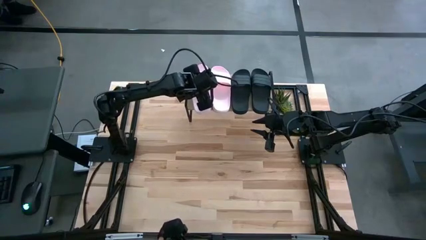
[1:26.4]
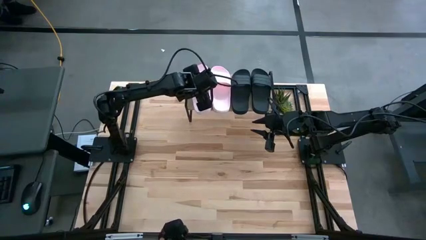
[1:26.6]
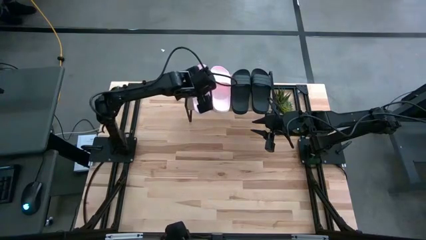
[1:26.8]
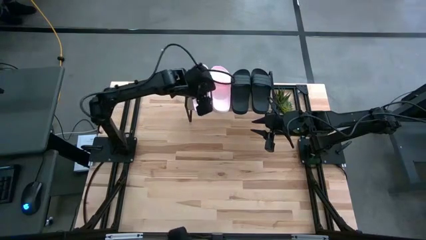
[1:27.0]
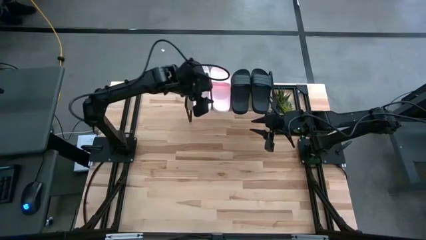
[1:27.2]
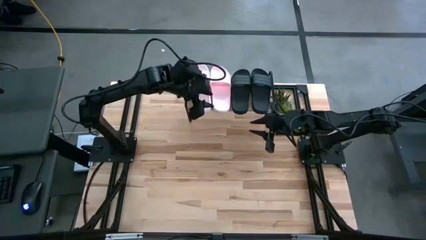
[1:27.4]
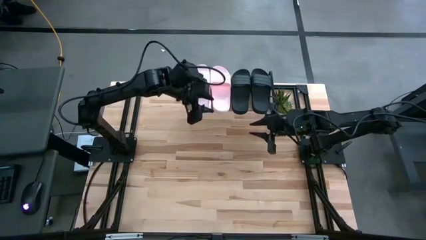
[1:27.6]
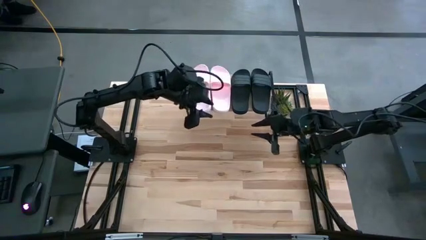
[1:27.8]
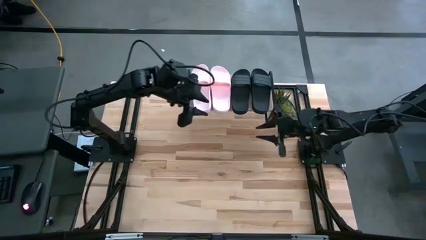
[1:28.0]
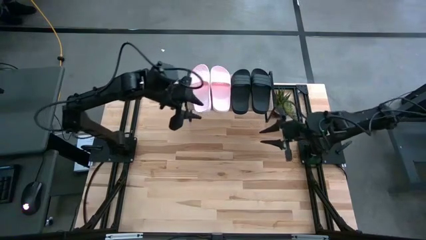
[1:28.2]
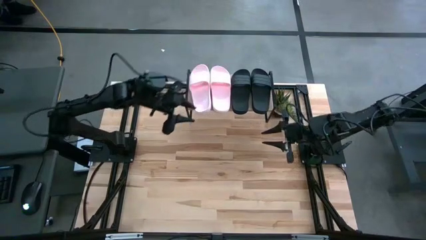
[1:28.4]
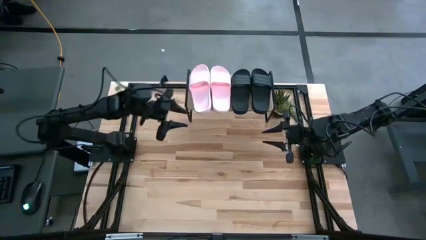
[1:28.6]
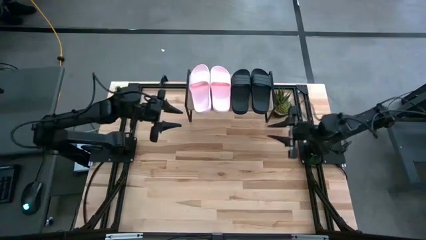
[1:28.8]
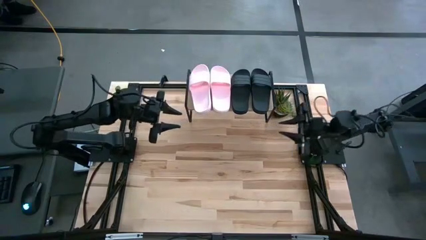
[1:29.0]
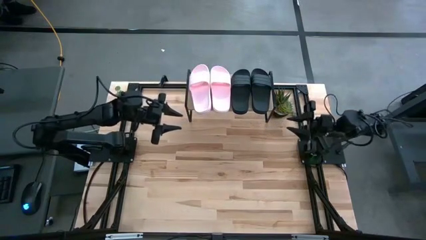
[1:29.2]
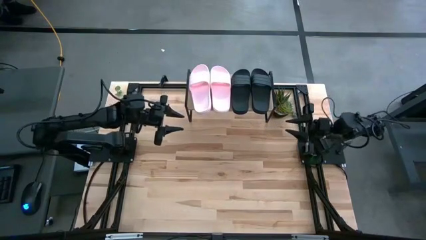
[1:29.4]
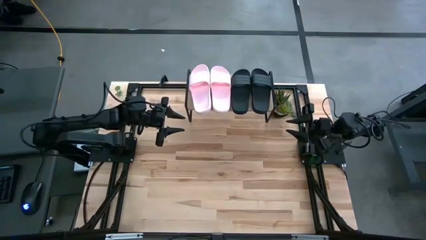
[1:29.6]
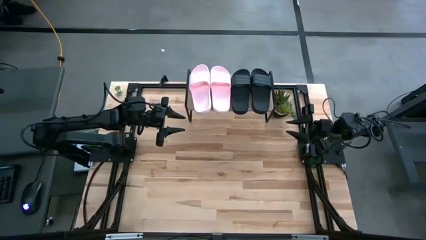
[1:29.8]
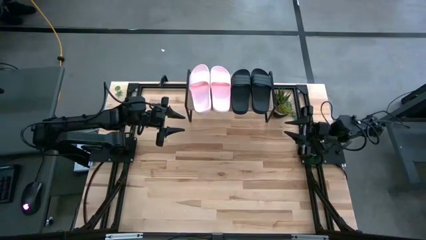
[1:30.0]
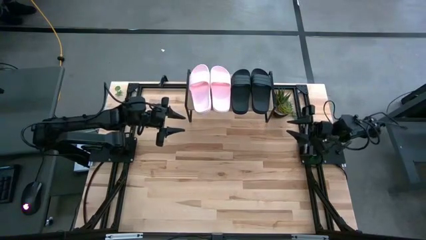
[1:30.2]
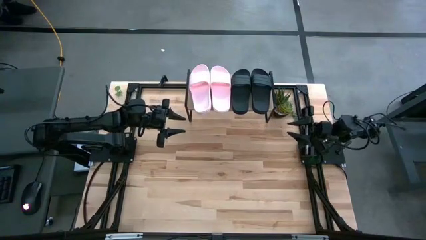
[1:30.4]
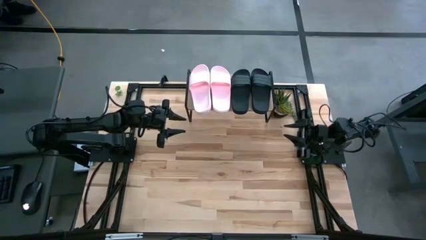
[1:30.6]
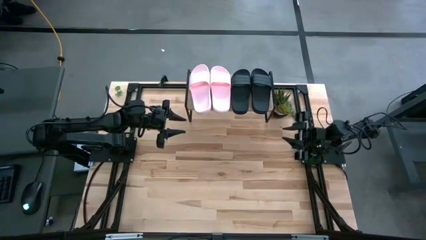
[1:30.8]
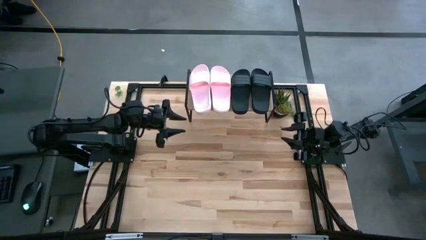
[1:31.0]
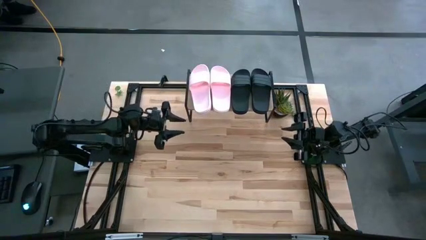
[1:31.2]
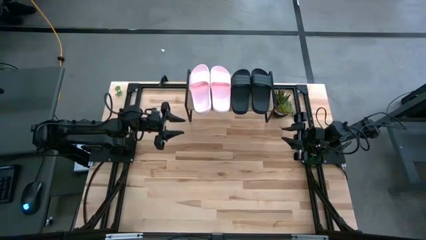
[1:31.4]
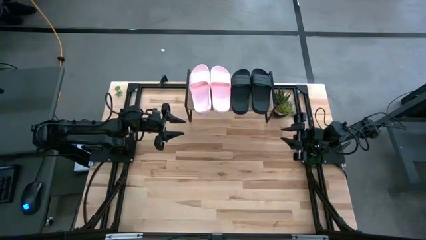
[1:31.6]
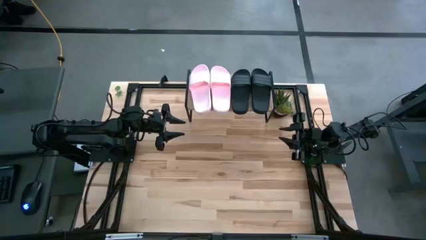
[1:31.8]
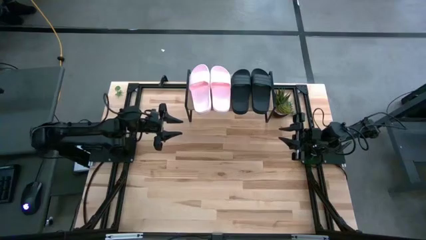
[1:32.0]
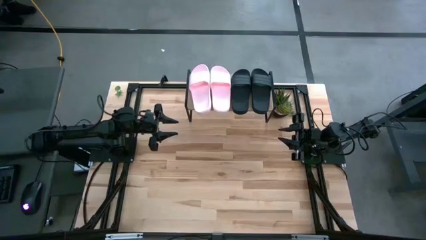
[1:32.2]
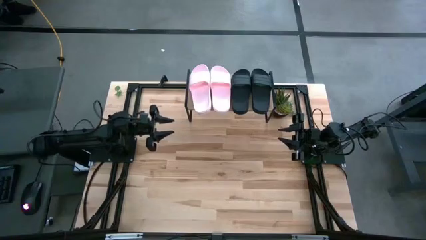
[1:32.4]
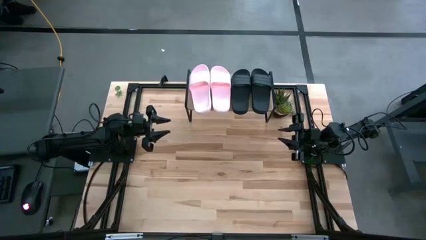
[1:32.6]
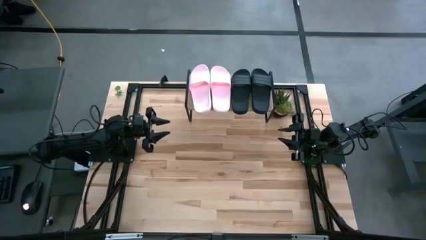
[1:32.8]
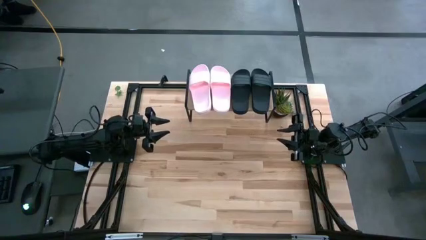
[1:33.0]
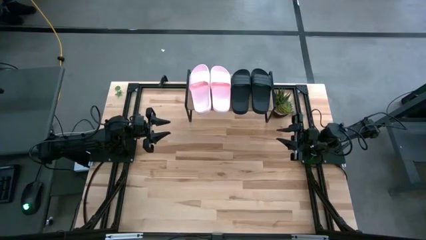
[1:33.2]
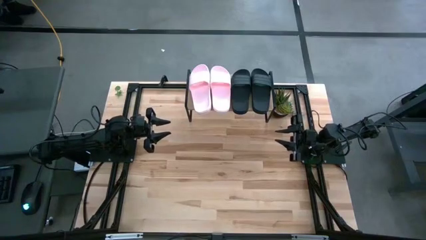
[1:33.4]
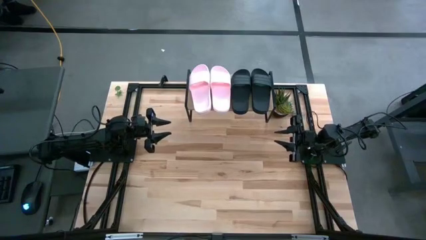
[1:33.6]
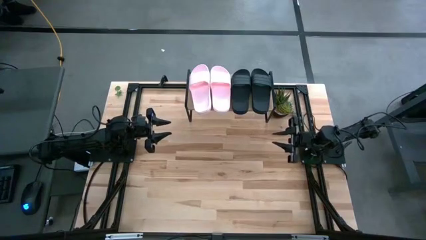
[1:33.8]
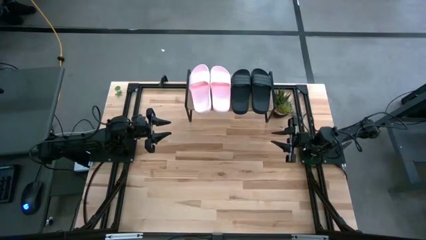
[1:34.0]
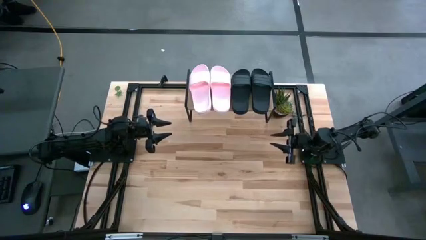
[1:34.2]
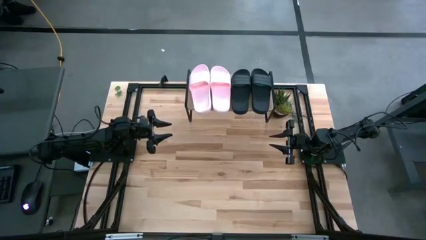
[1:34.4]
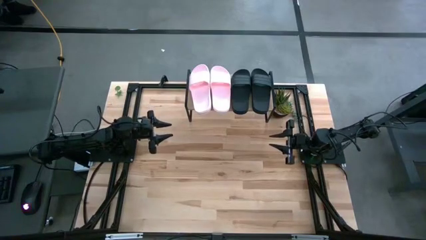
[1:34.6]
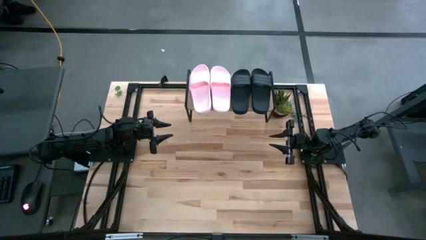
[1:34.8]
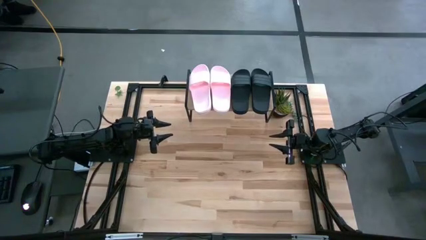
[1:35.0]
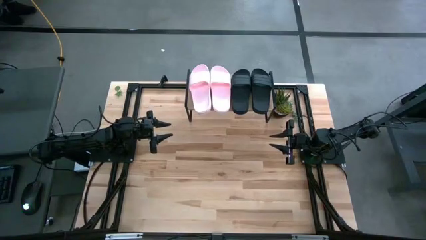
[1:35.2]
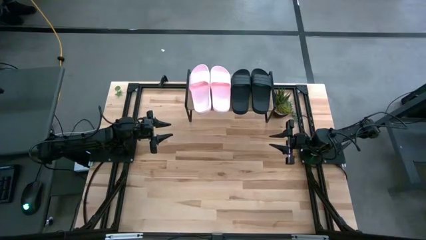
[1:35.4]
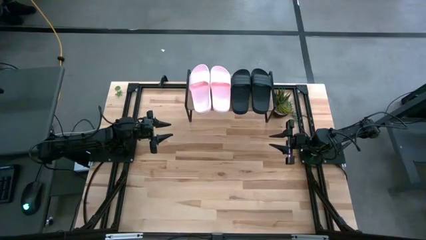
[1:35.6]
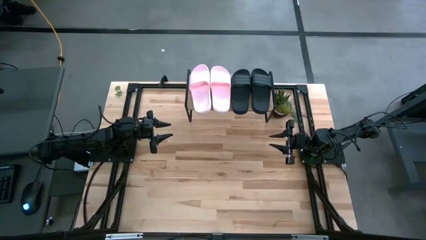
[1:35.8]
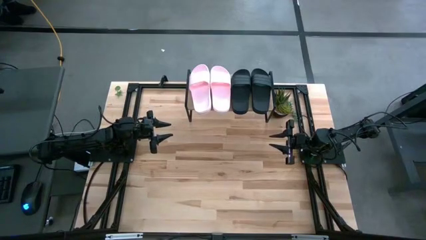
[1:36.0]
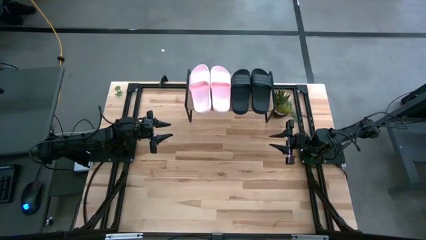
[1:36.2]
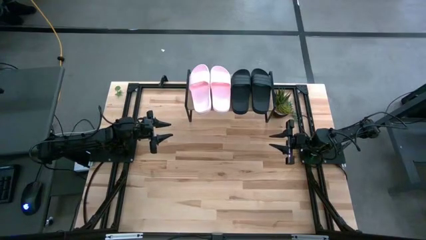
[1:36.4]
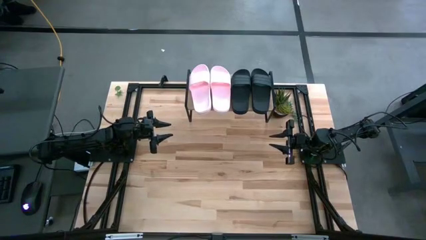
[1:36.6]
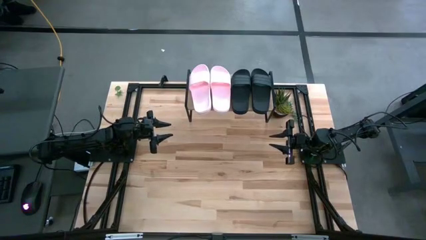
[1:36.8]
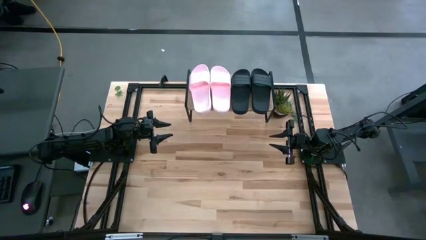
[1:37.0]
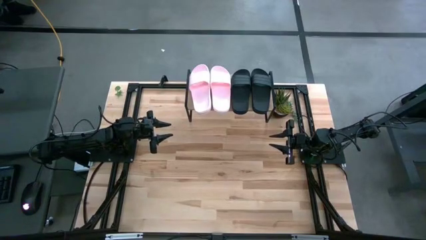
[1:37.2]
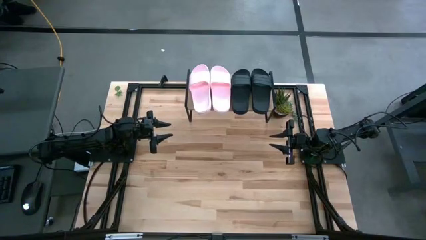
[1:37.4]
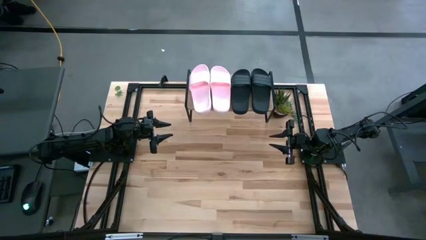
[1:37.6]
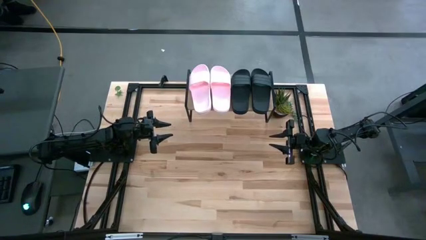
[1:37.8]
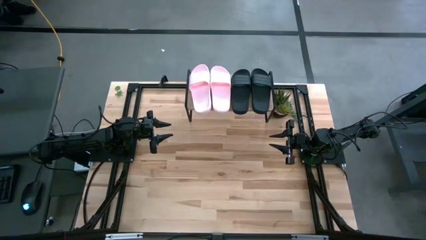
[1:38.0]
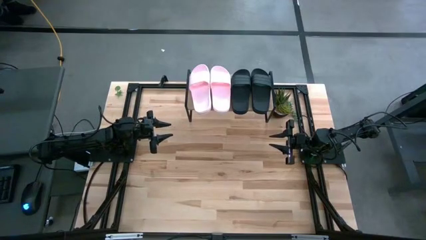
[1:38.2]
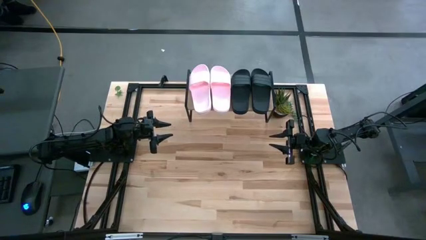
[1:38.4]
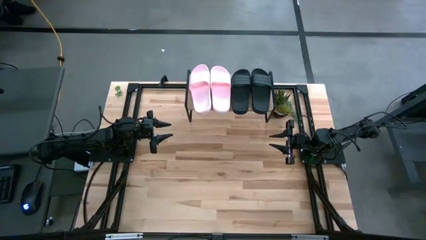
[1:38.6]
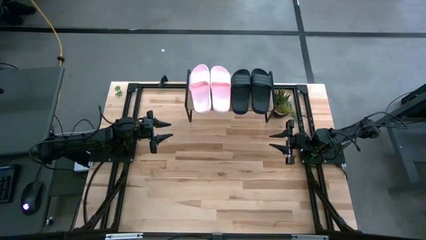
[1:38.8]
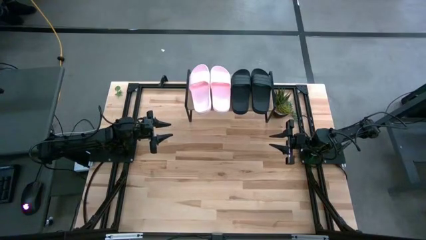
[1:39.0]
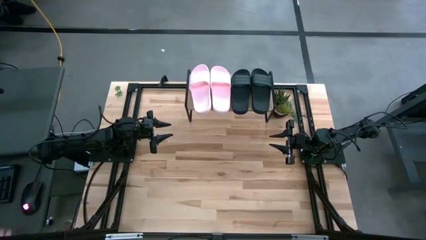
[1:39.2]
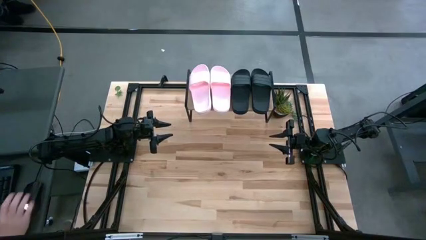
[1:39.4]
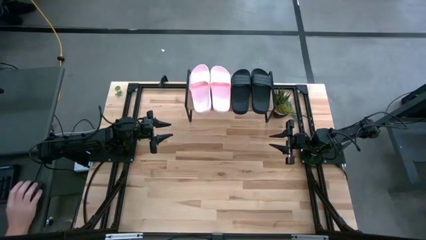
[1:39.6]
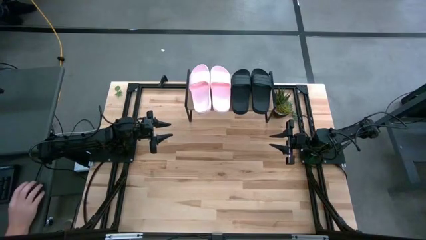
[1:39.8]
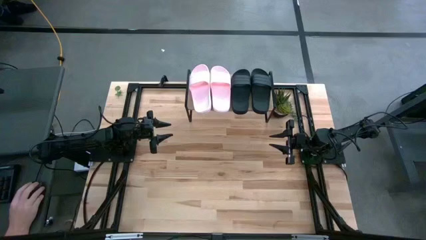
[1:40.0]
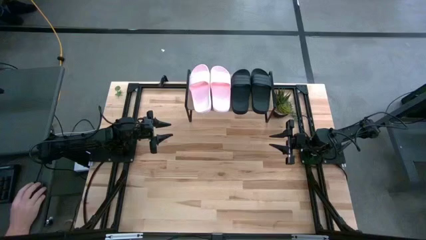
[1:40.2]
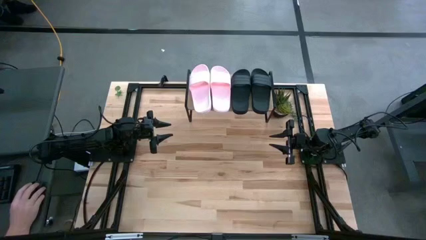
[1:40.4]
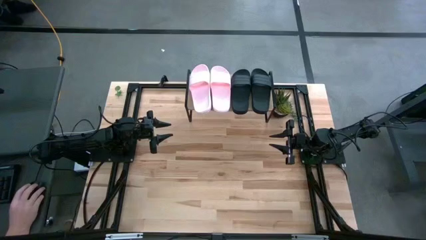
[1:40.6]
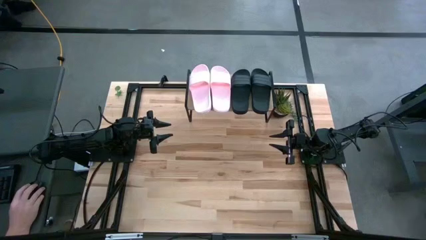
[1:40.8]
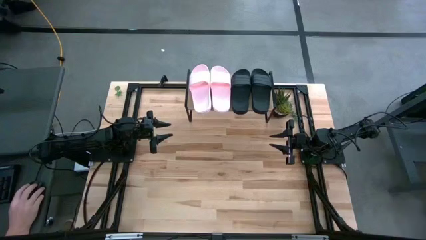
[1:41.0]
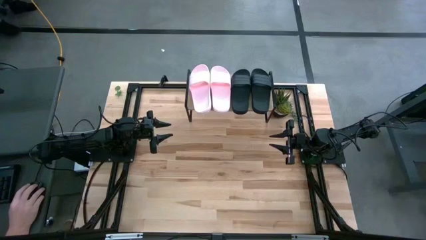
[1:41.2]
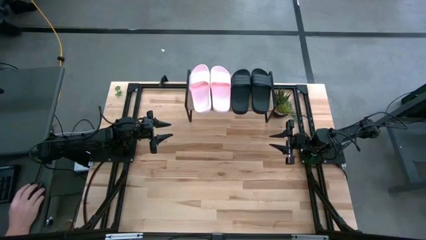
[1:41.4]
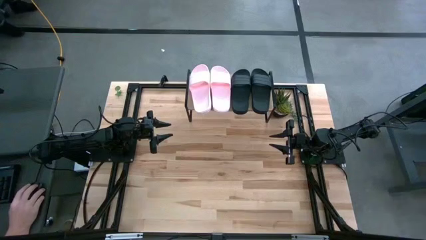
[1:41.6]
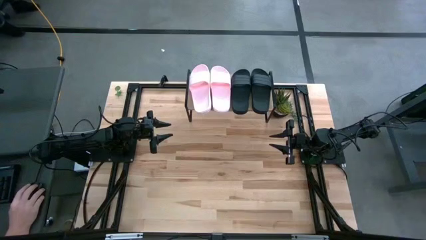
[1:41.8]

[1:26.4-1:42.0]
Task: Pick and place slides into the shelf
Return to Home Position
